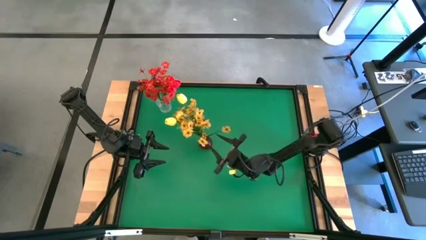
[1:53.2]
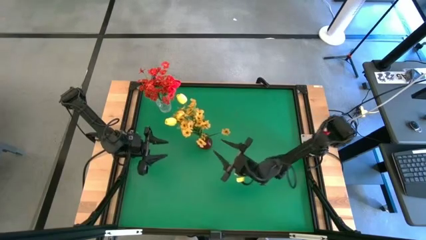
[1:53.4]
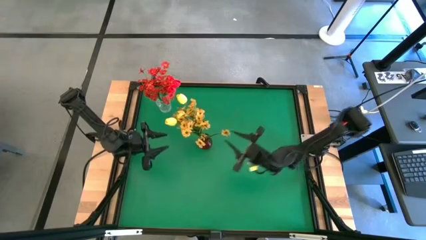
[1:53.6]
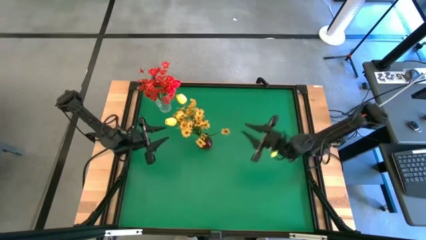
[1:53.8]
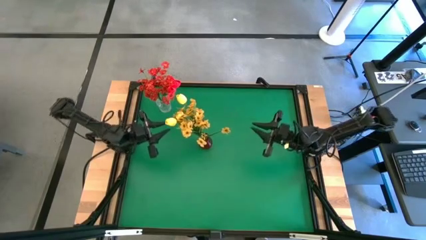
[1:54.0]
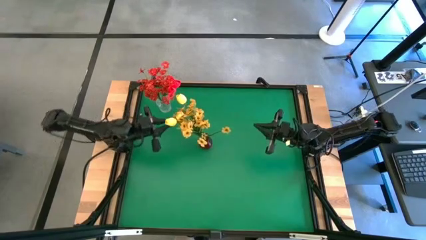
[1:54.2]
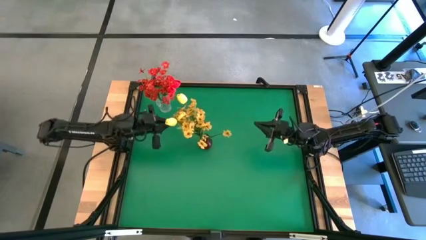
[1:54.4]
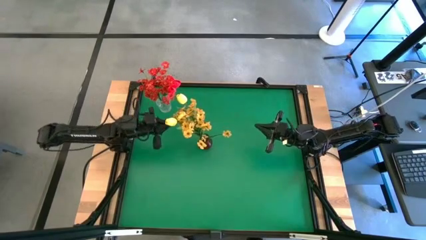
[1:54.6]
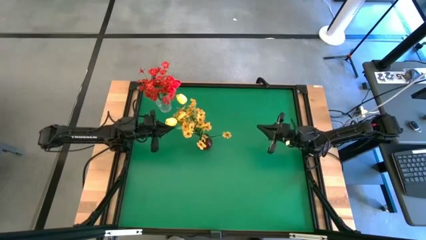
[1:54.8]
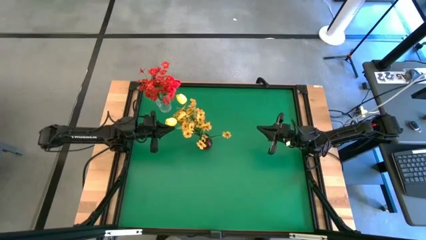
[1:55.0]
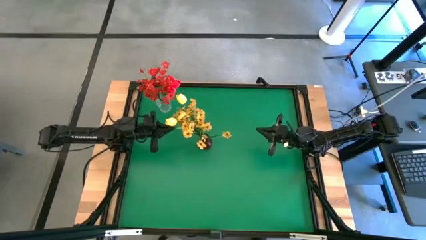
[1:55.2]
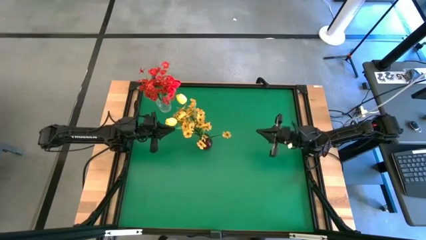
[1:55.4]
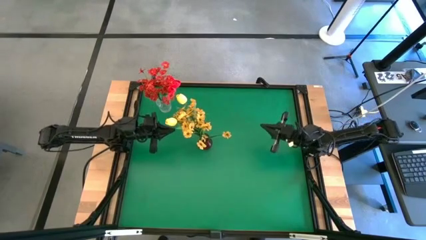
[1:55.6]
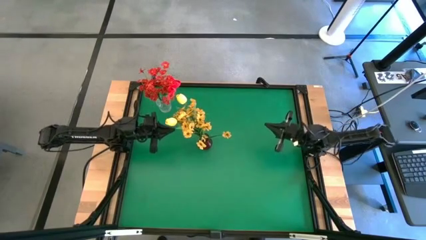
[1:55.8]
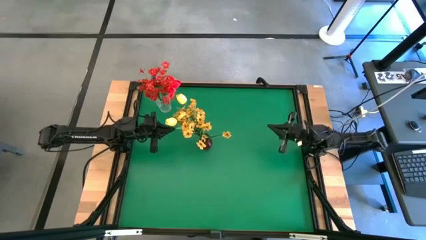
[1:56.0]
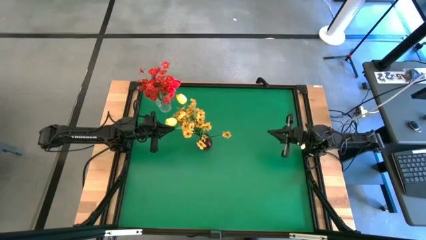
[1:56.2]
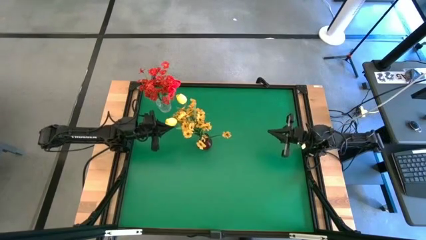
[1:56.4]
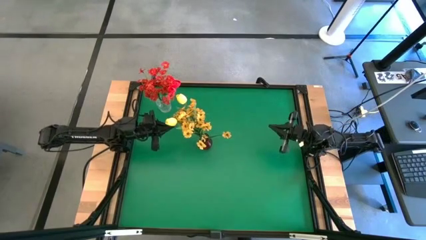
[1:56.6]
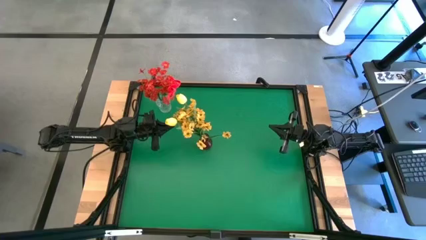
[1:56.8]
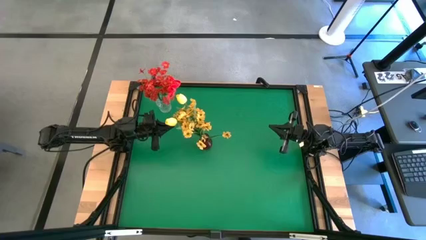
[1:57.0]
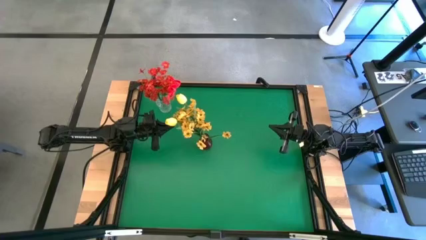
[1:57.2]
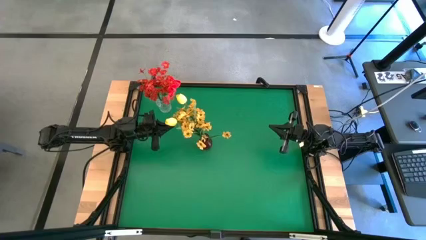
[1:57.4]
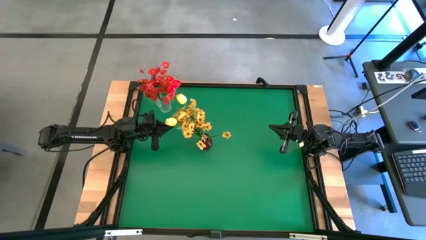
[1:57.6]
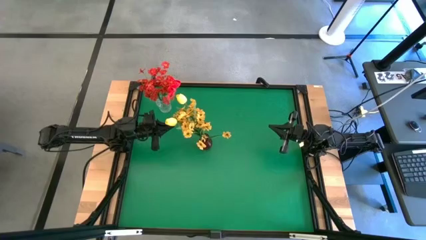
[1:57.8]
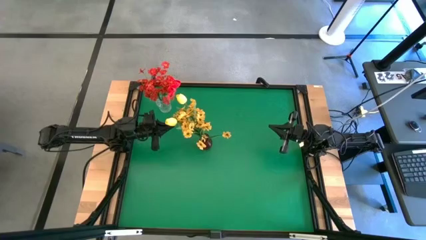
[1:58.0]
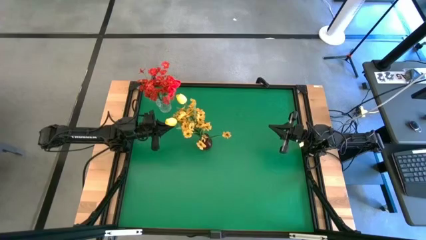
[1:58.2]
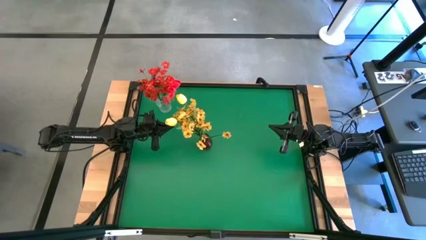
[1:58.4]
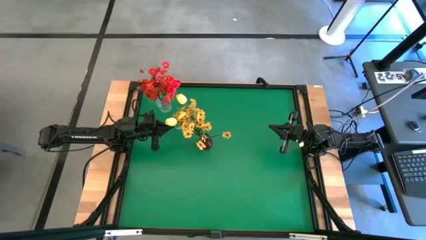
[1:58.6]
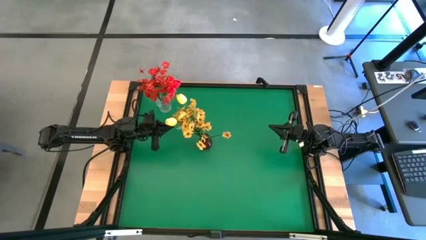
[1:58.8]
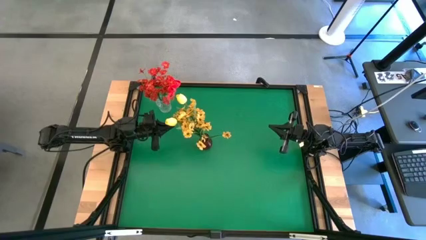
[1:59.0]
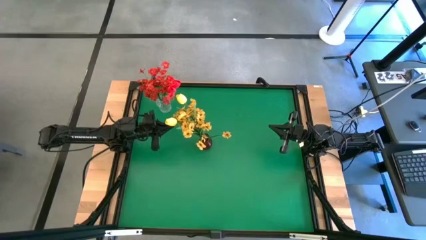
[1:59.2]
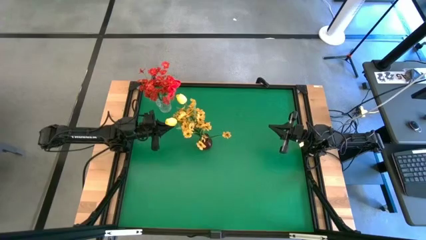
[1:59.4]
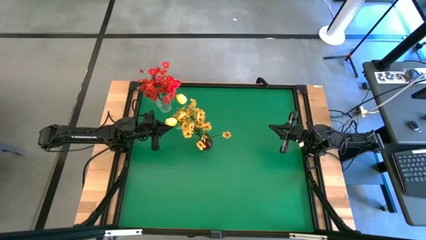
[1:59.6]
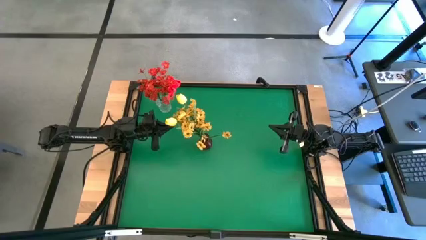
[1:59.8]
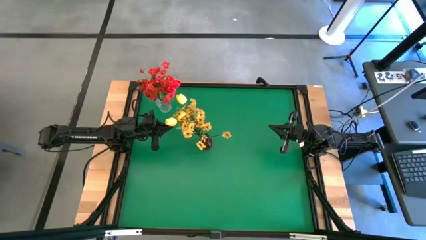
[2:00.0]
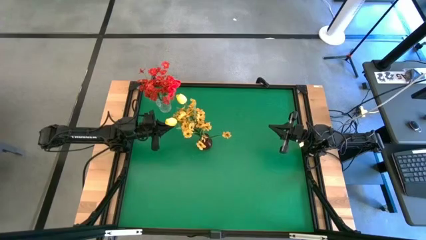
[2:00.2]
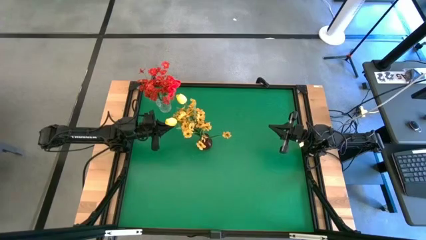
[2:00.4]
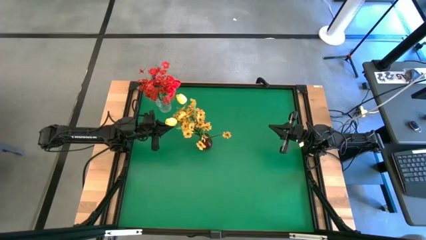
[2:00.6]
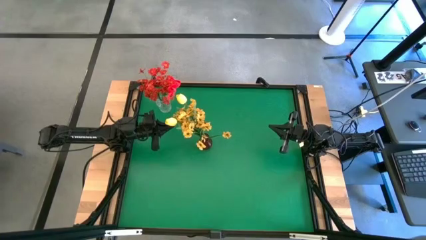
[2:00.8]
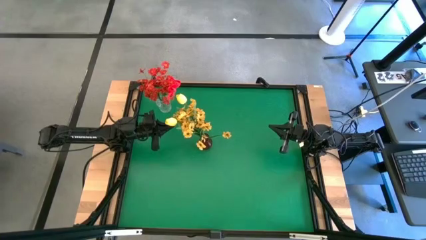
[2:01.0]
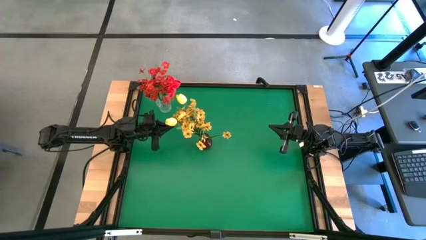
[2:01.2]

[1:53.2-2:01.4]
Task: Sort flowers into vase by color
Return to Home Position

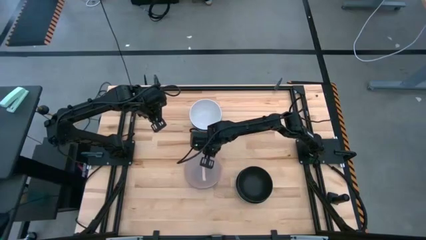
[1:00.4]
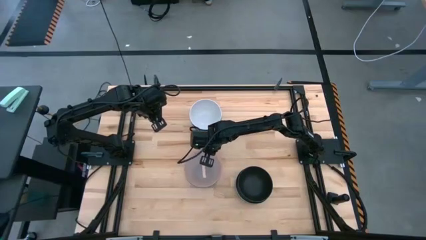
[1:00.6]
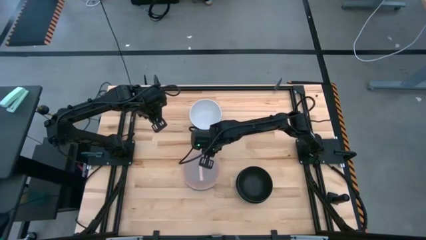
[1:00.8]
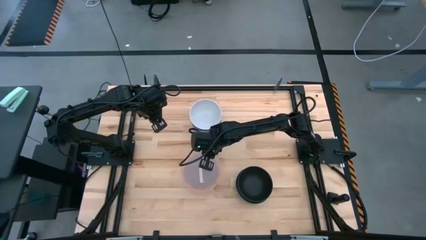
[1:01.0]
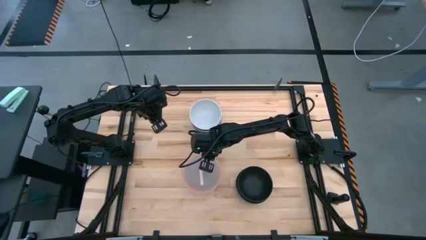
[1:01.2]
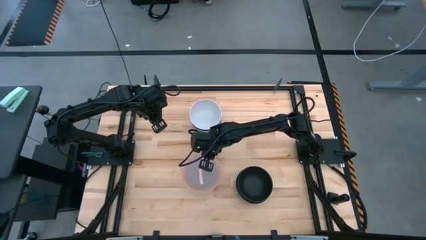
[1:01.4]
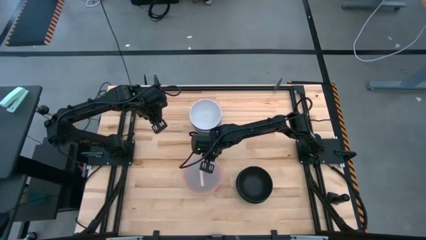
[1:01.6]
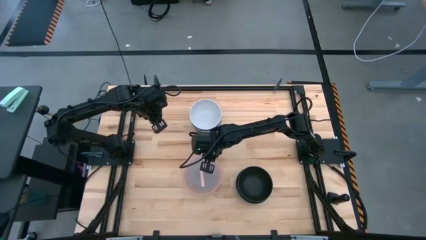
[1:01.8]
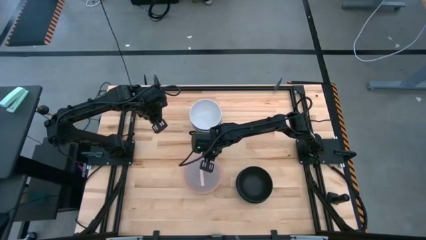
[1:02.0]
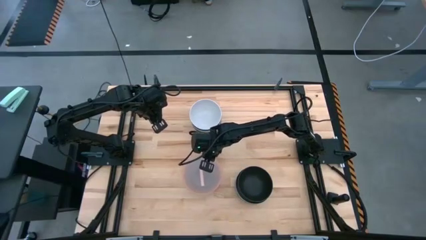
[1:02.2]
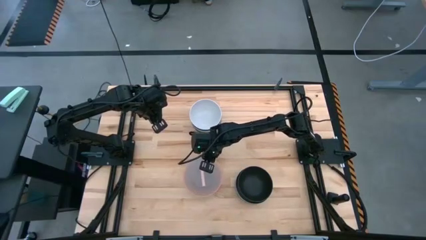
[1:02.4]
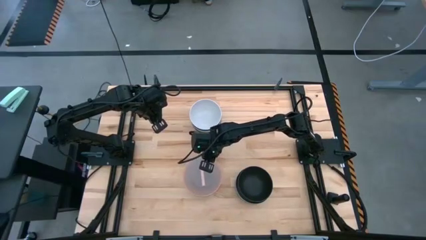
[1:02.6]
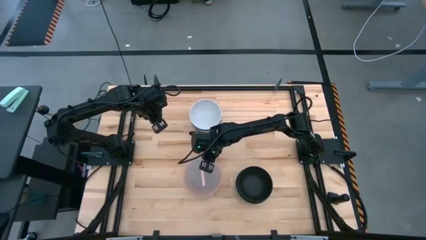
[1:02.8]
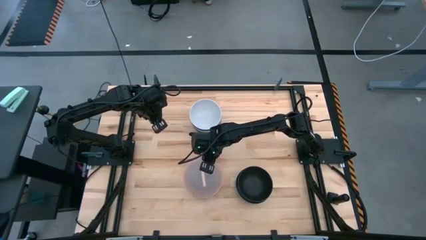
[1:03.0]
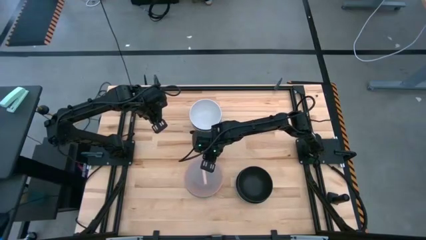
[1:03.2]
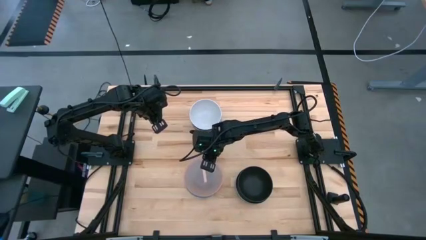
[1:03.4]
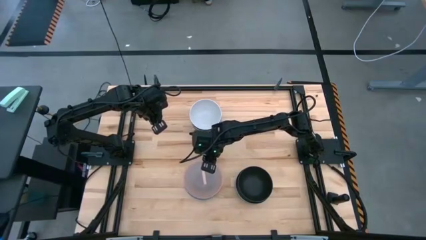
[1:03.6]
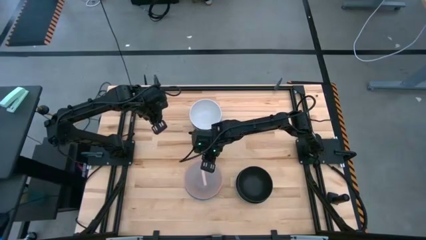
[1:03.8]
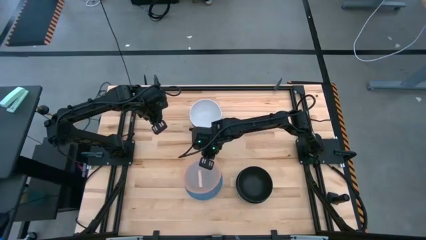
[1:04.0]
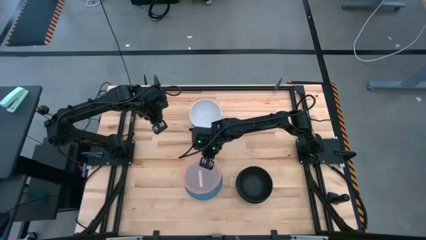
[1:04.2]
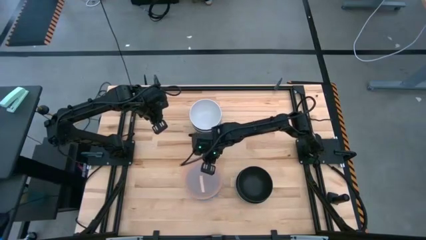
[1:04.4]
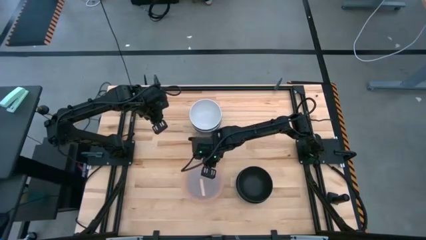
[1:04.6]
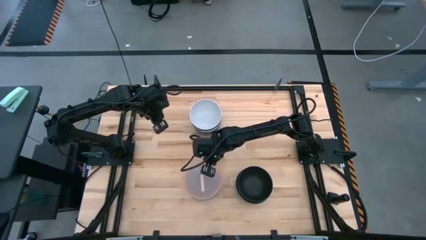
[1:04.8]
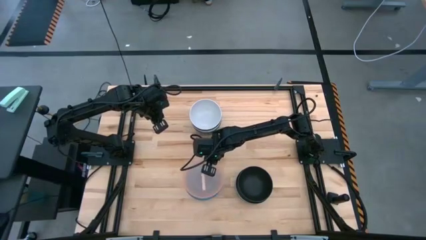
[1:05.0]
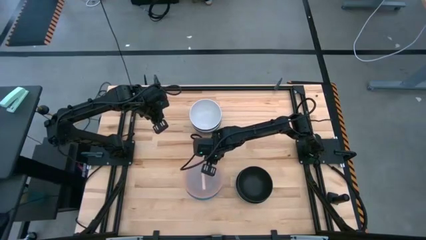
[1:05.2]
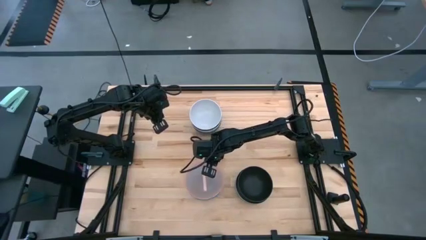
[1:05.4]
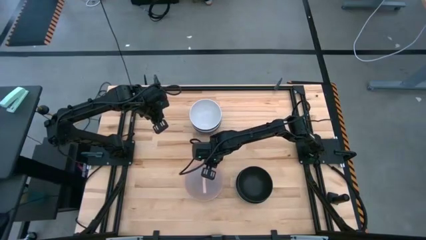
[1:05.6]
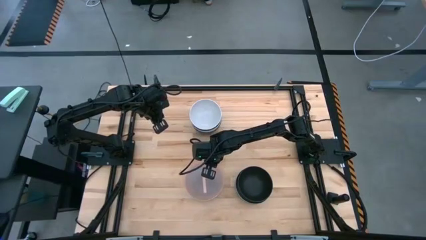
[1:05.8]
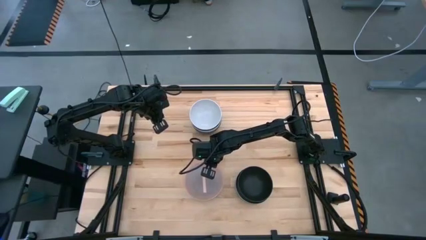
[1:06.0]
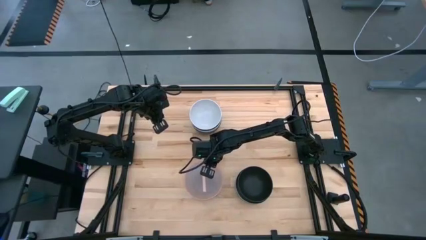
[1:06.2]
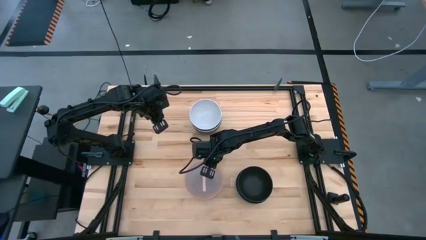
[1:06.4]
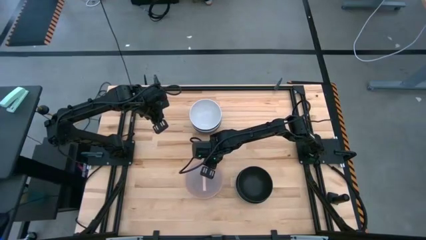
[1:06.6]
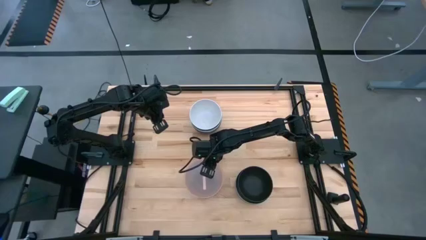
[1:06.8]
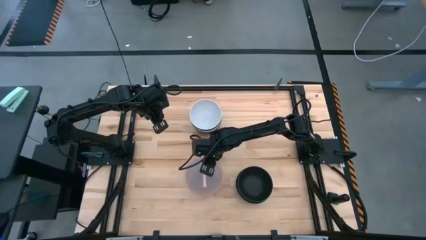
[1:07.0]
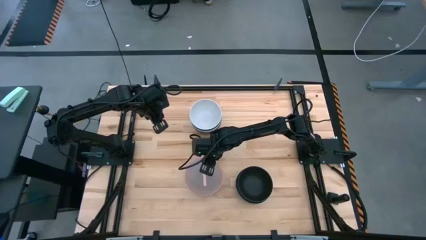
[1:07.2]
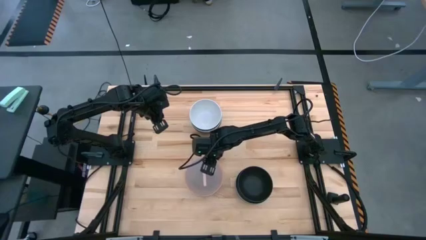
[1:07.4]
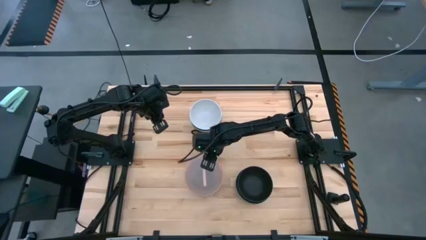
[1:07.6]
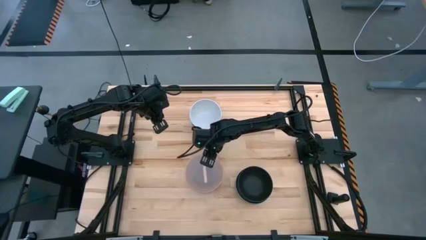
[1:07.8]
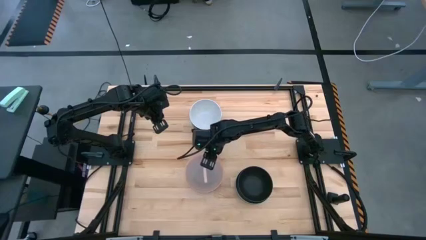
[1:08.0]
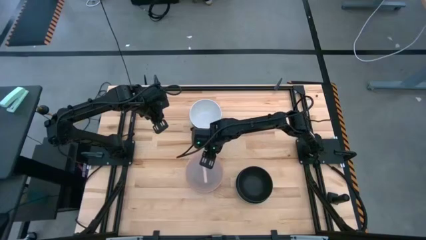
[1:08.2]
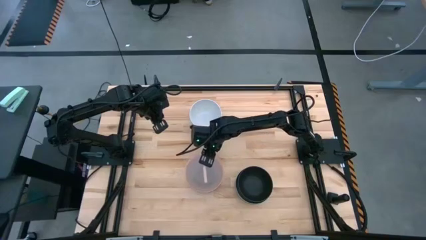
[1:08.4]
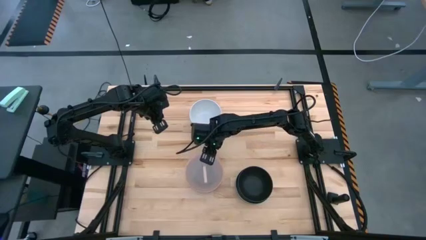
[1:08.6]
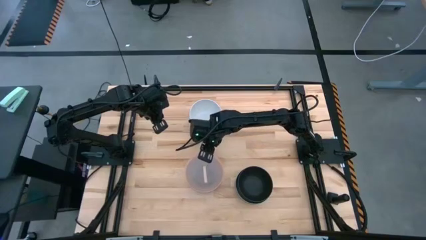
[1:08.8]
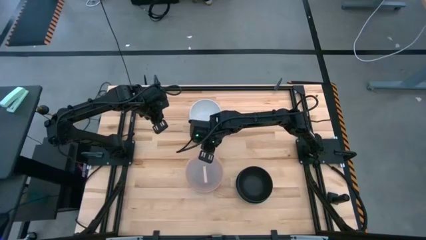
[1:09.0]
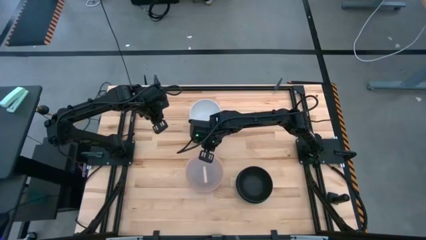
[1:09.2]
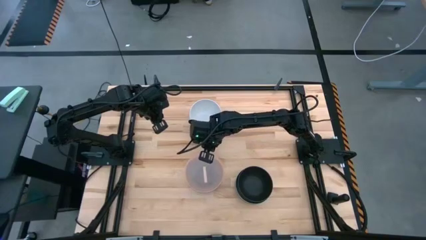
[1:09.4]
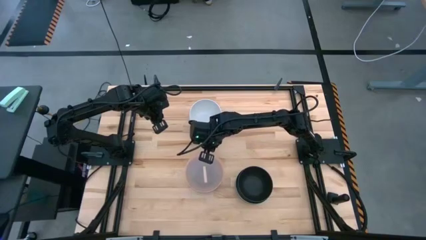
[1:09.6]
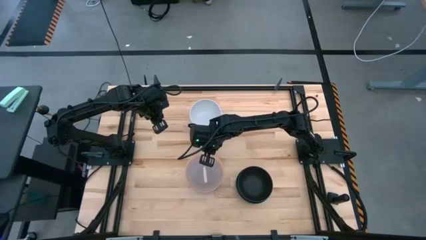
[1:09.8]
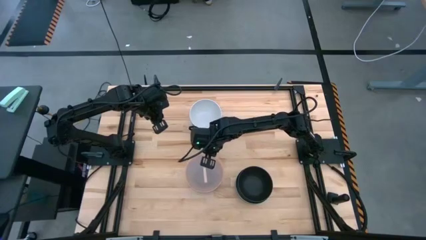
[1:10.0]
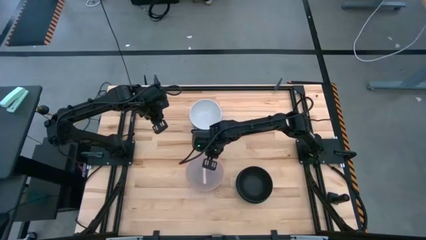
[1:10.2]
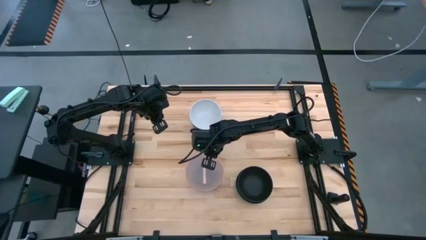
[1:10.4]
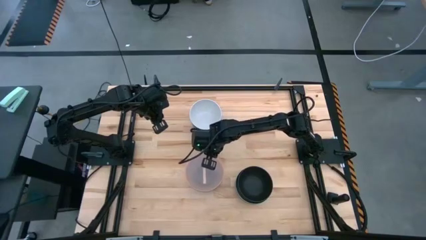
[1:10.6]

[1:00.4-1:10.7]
Task: Nest bowls inside each other
Stack the orange bowl on top of the blue bowl
